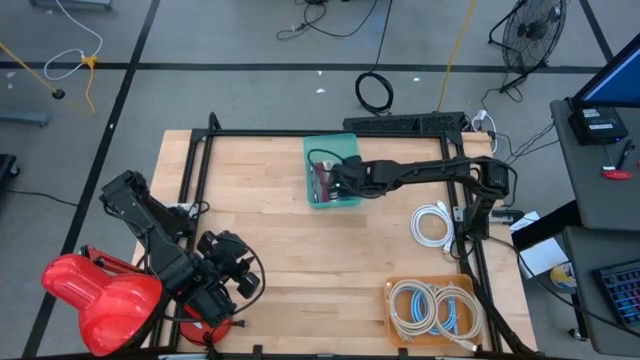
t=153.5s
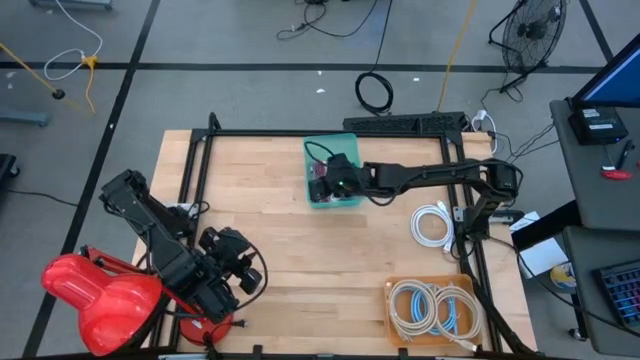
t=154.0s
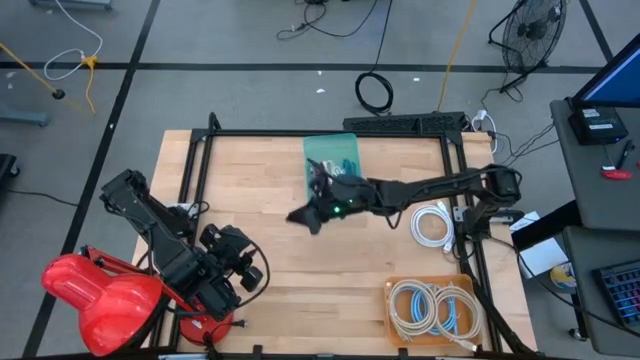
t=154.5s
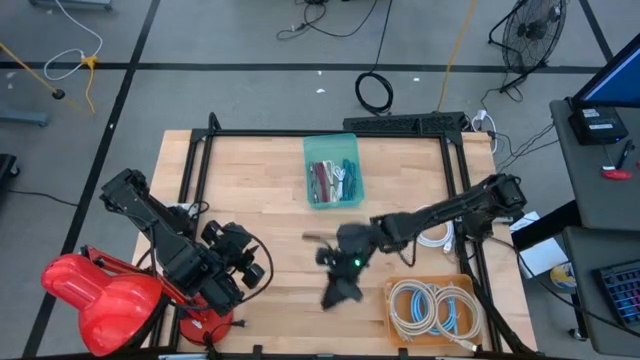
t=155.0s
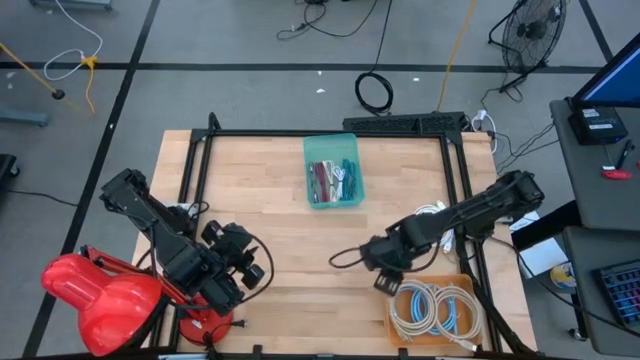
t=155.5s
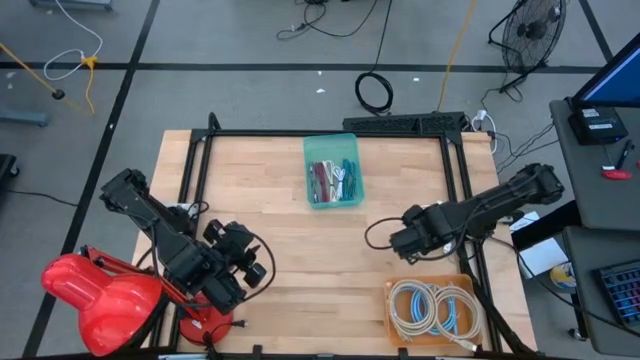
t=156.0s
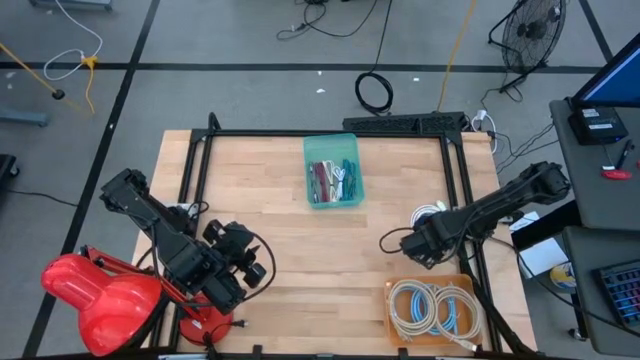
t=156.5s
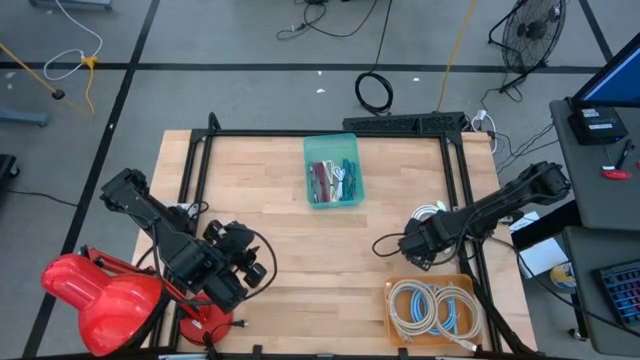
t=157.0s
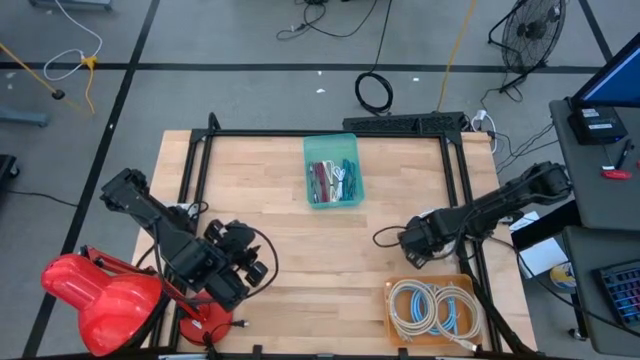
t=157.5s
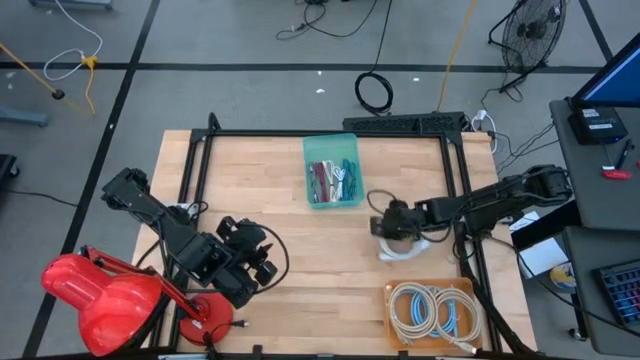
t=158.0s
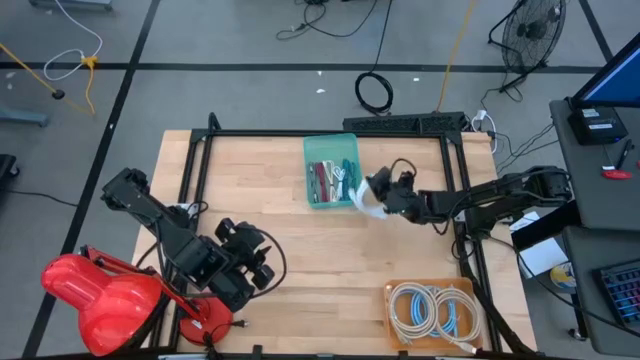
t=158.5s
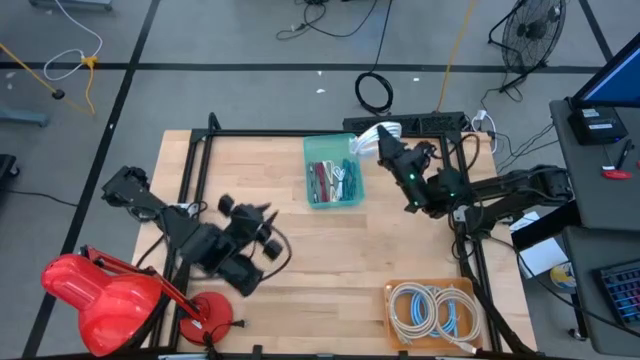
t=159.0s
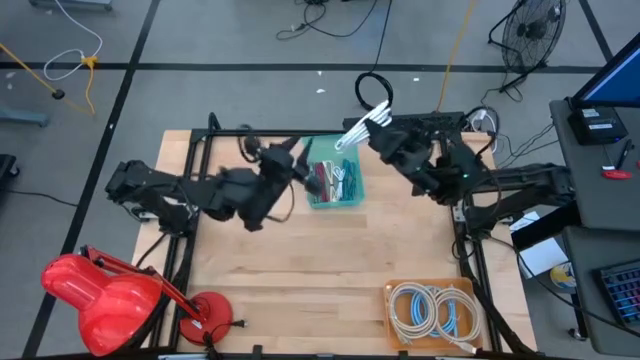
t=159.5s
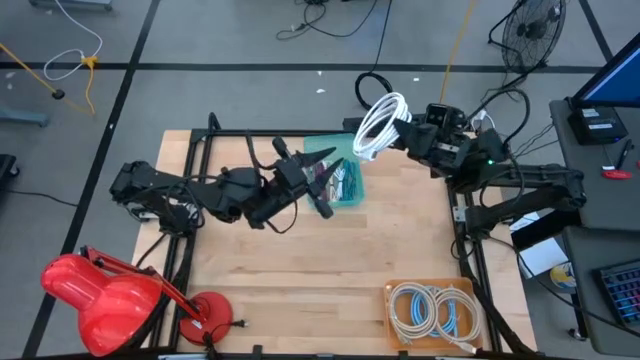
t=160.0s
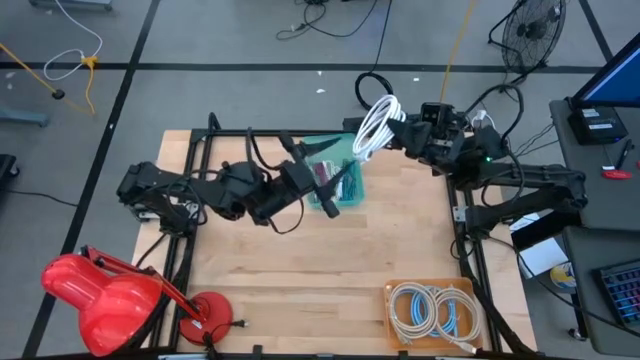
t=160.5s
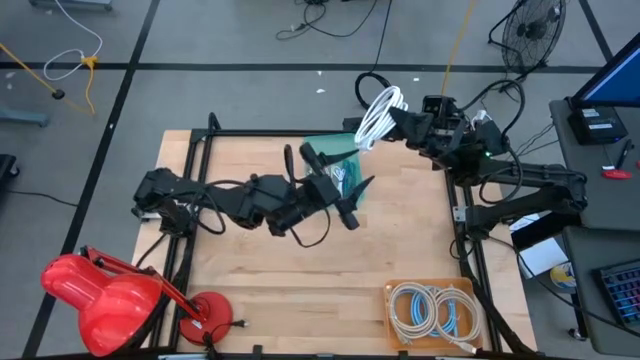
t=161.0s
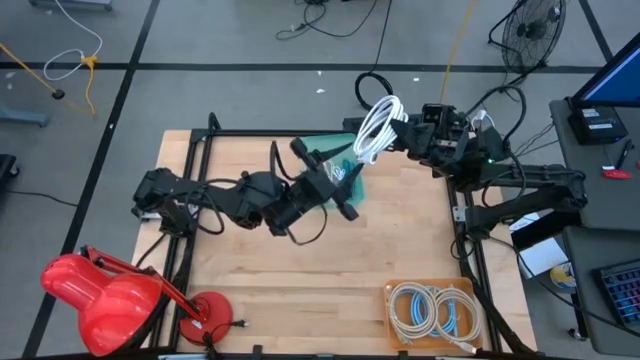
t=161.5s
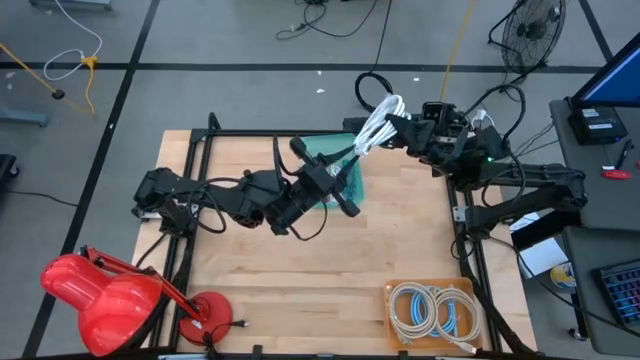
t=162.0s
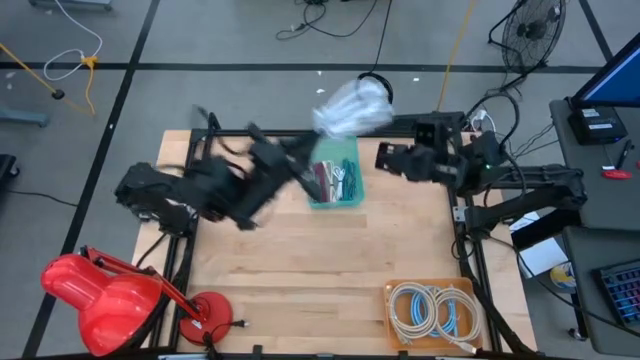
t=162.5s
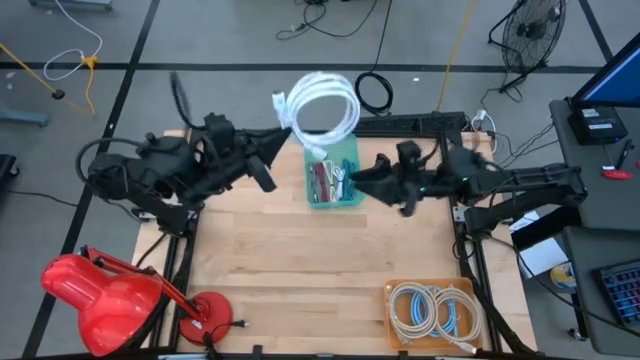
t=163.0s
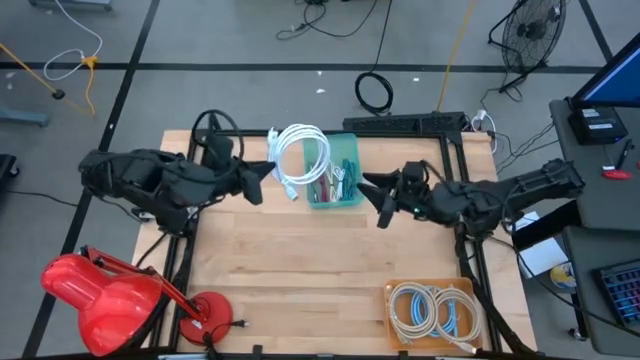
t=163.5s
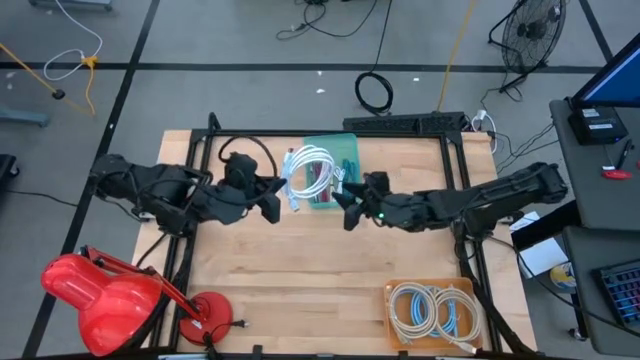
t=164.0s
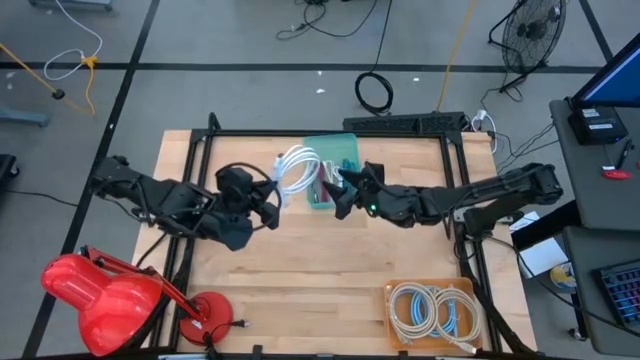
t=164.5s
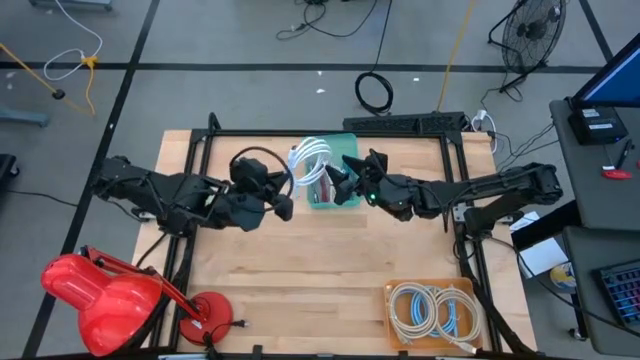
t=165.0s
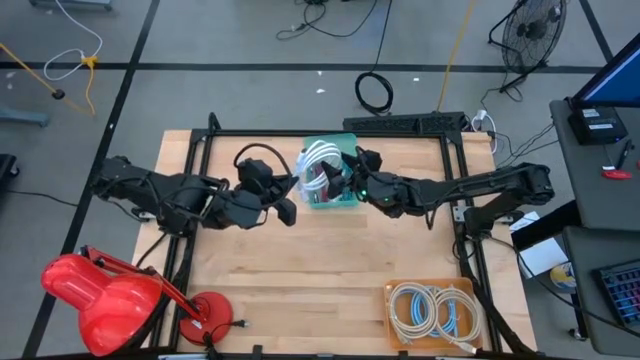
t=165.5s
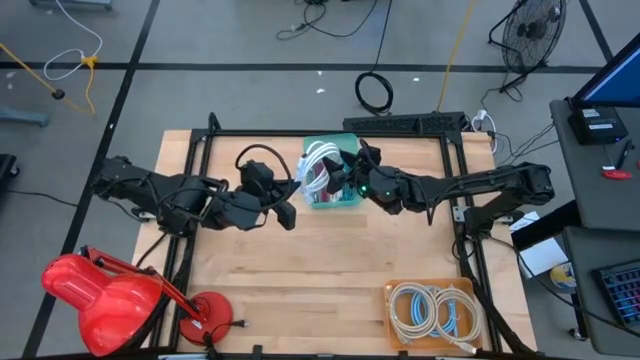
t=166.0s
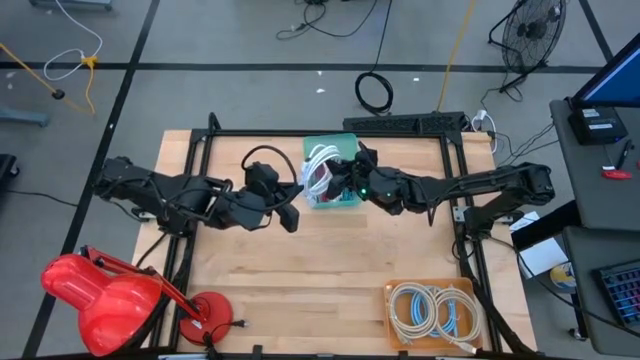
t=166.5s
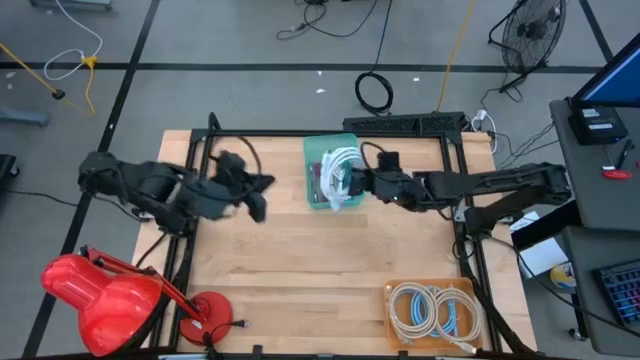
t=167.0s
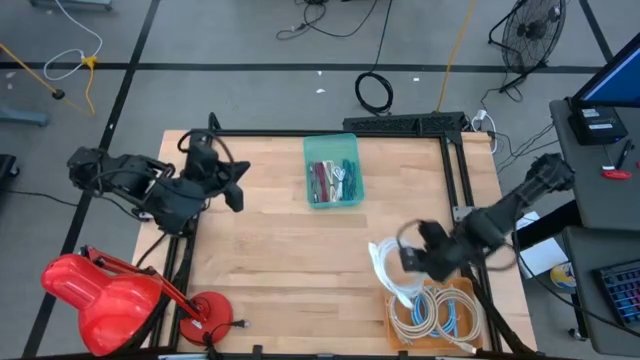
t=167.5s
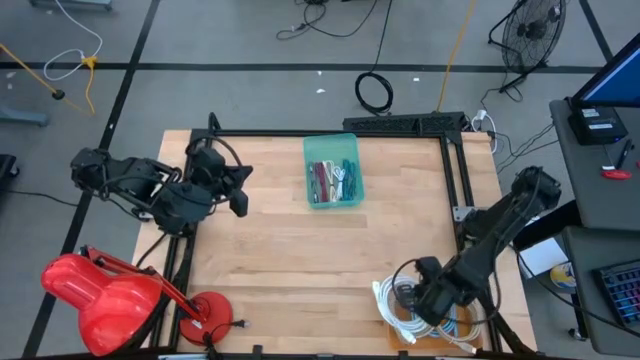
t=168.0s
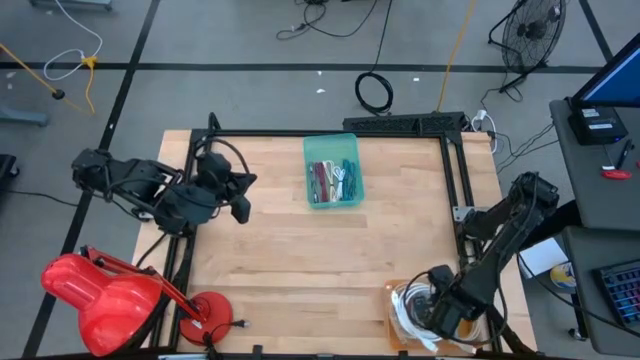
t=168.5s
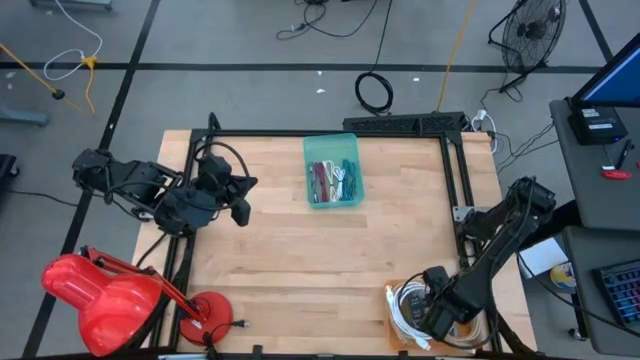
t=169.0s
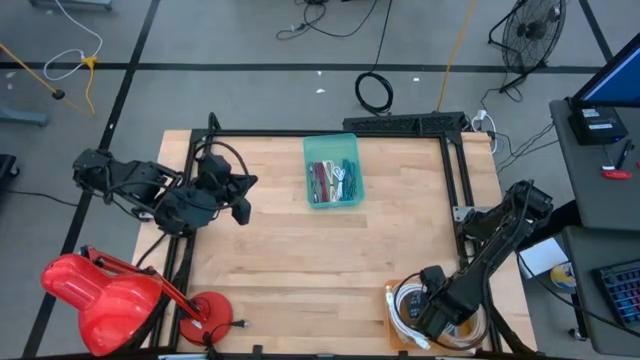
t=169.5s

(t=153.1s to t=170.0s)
Task: Pick & Place USB Port
Put the white charger cable into the orange bin

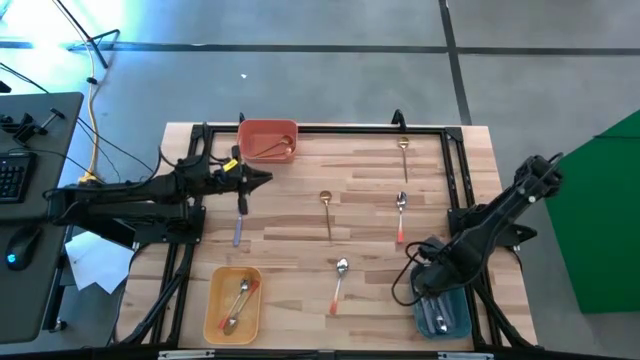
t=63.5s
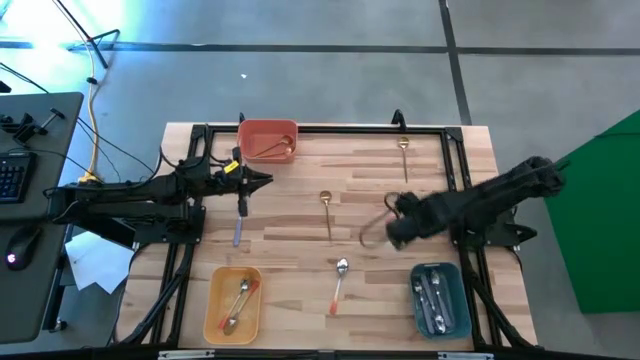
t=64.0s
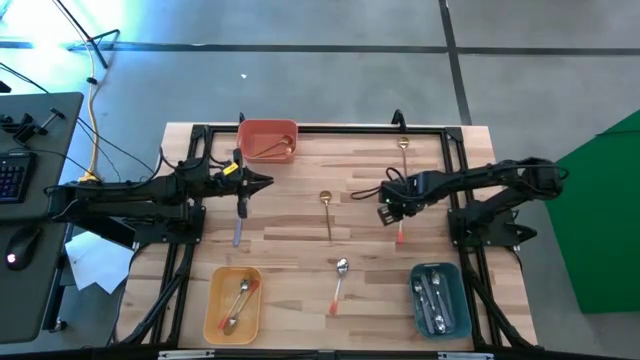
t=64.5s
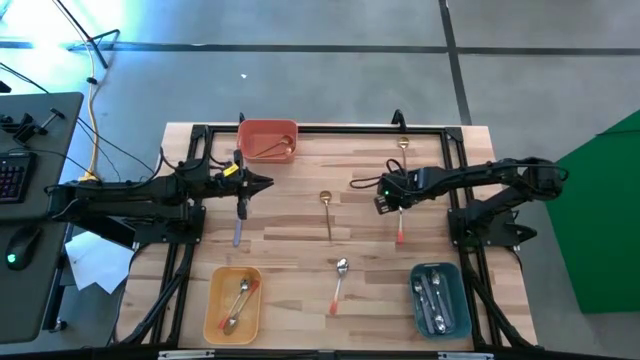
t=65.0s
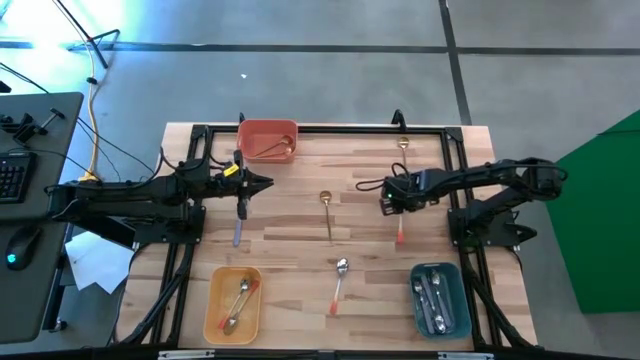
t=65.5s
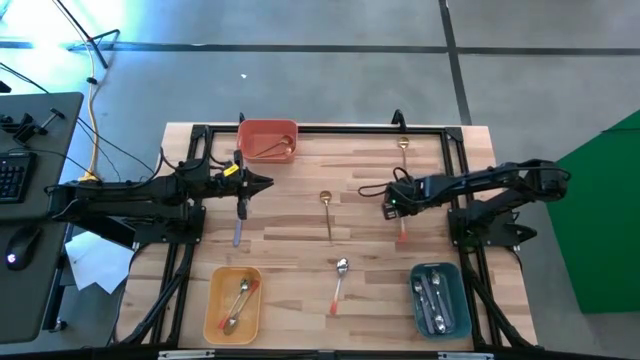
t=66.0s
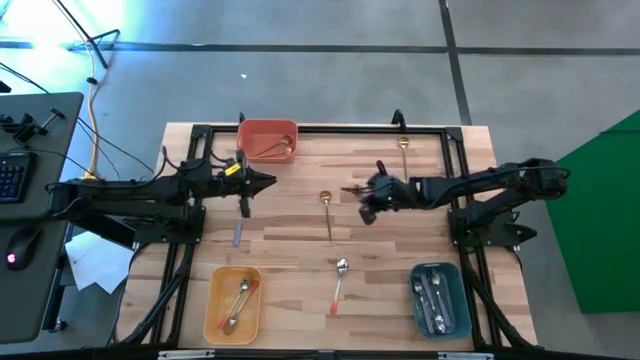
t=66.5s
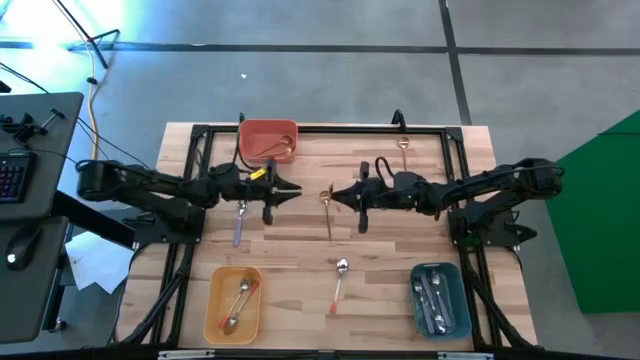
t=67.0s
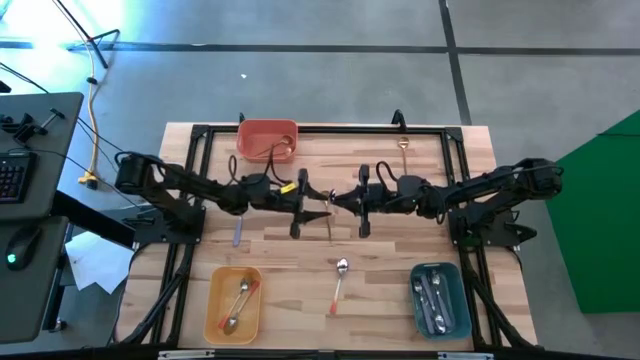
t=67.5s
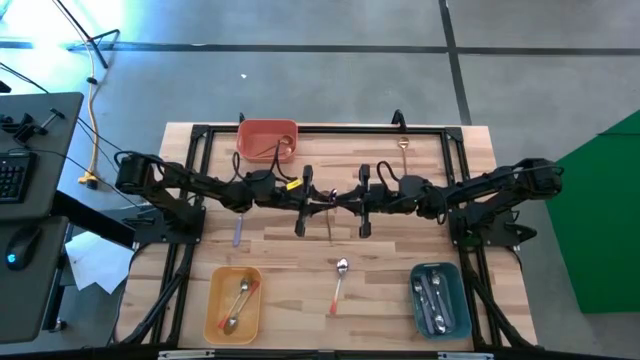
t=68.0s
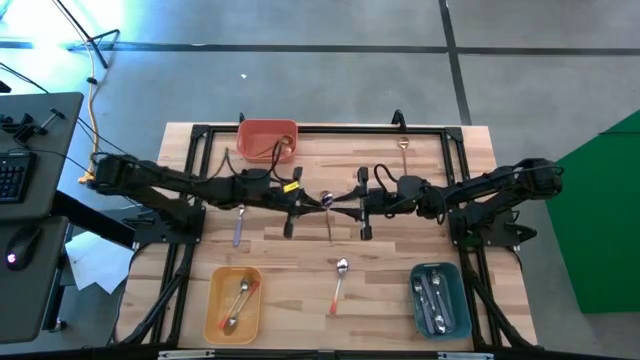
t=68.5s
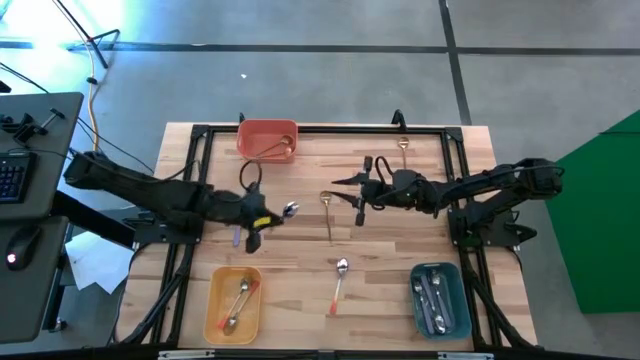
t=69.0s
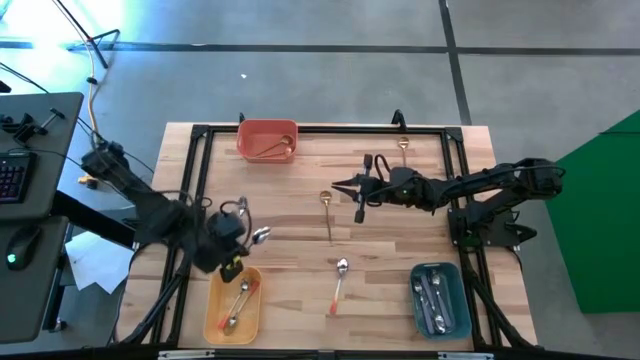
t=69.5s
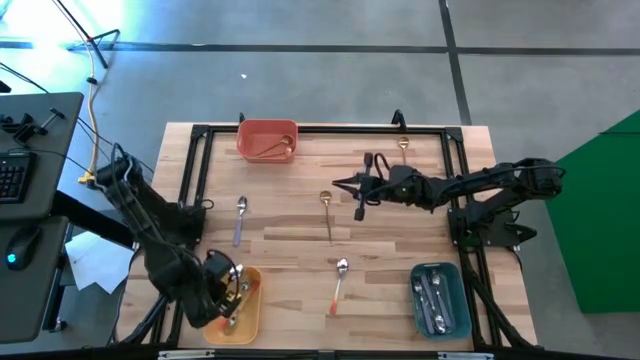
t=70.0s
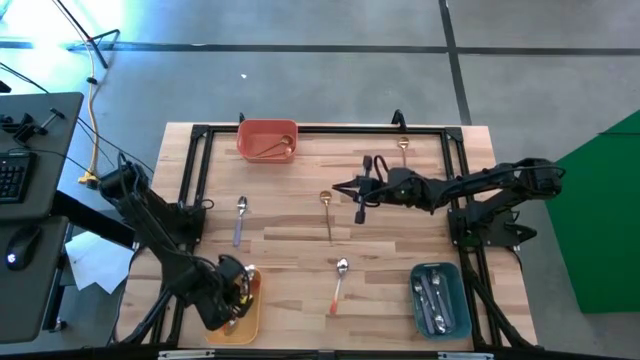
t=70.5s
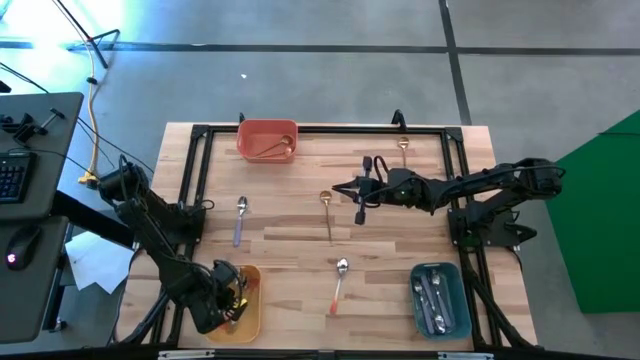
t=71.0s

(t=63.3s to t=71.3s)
Task: Sort silverware by color (type)
Put the top orange spoon into the yellow bin
